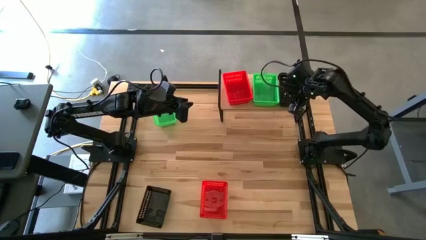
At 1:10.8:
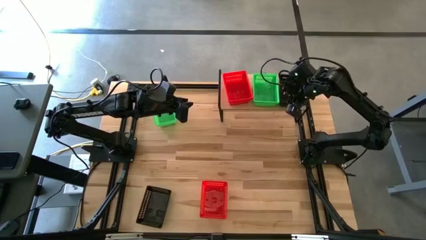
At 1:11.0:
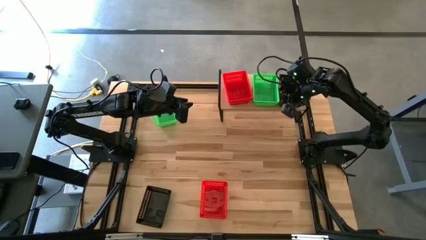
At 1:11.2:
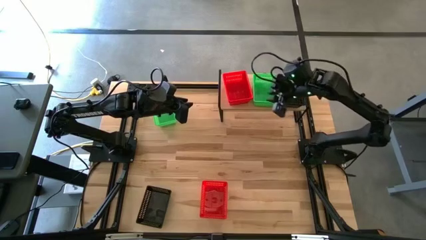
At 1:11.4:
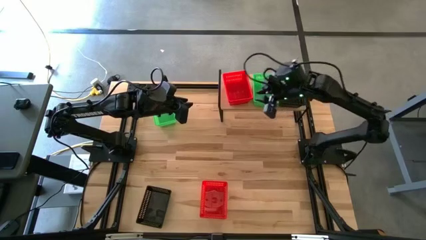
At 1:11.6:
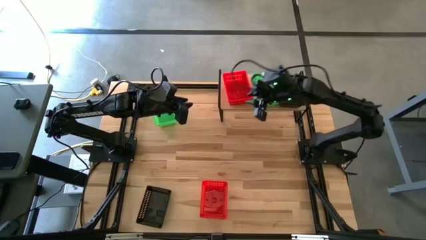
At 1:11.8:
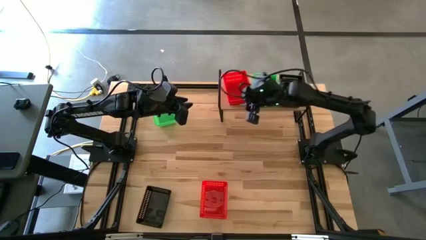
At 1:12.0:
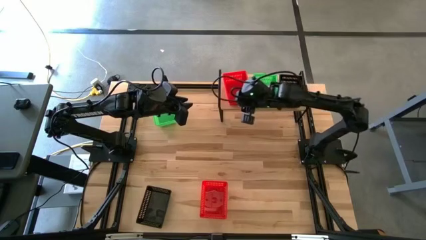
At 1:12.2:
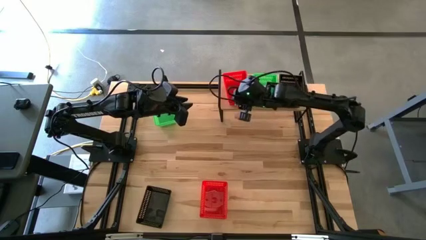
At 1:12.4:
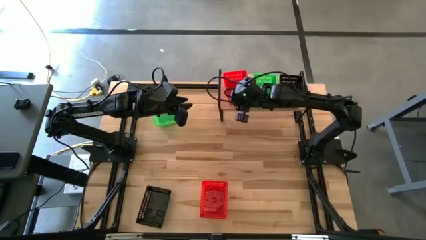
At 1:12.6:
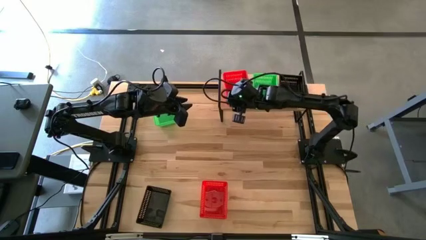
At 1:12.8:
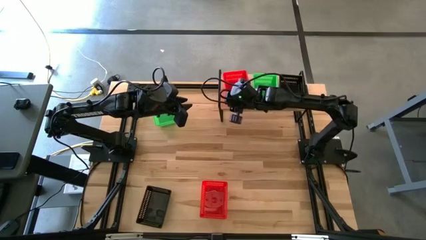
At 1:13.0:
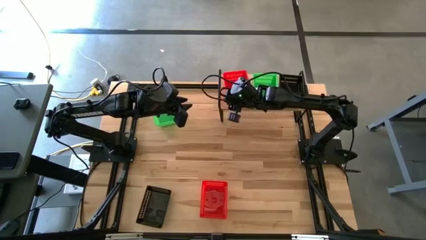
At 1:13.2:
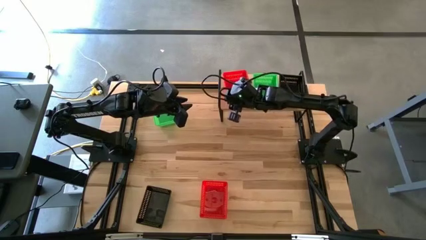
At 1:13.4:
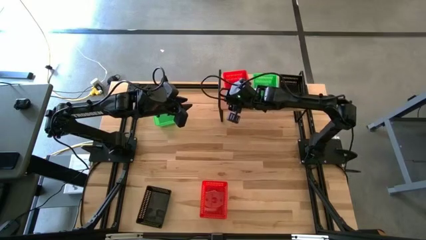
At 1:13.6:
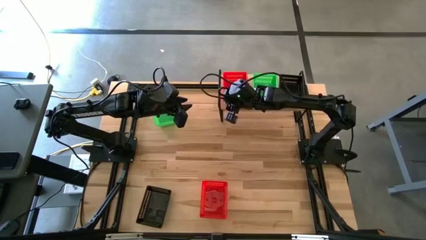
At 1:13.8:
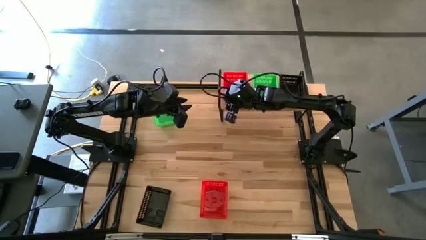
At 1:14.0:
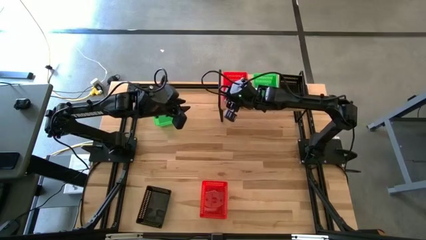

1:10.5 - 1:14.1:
Task: Stack baskets on shelf by color
Adjust the stacked red bins on the shelf

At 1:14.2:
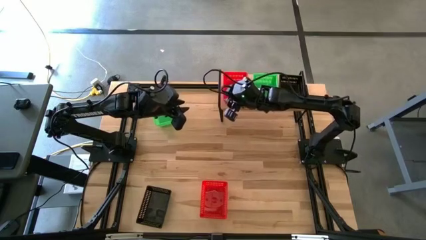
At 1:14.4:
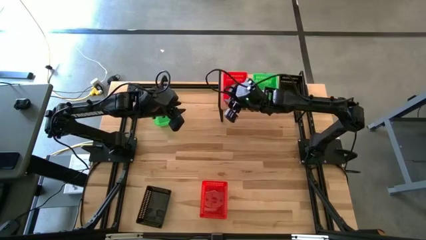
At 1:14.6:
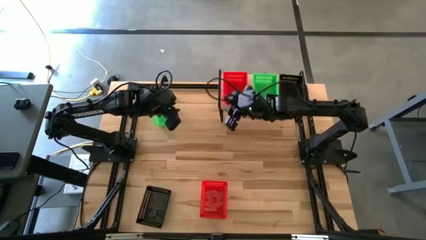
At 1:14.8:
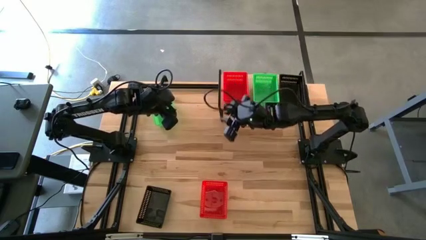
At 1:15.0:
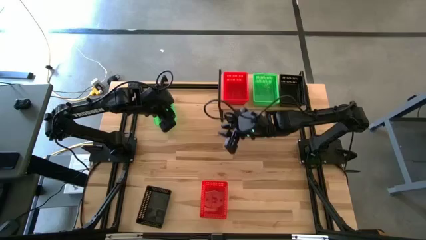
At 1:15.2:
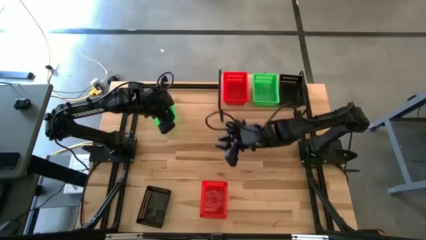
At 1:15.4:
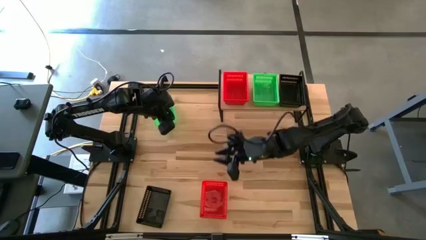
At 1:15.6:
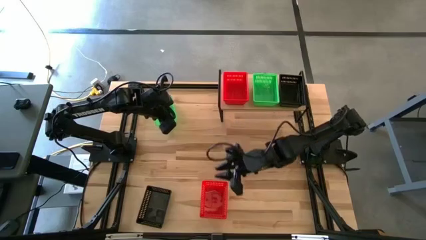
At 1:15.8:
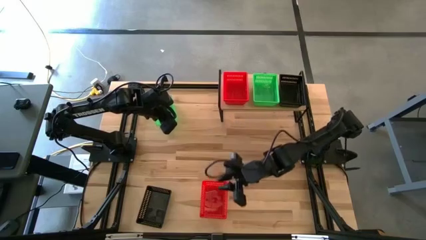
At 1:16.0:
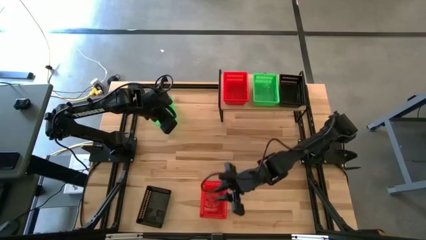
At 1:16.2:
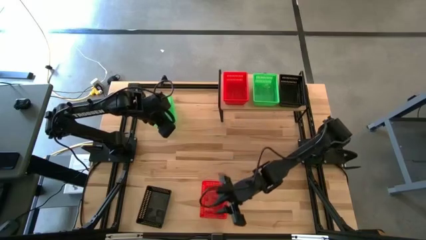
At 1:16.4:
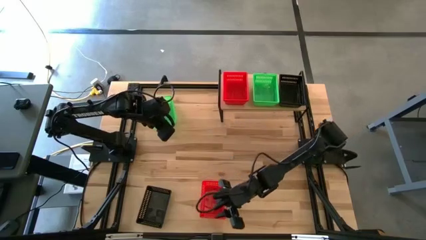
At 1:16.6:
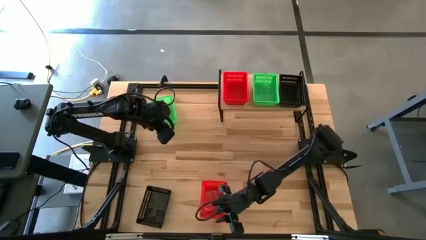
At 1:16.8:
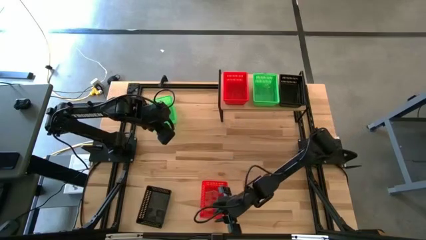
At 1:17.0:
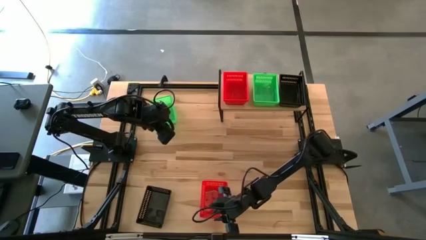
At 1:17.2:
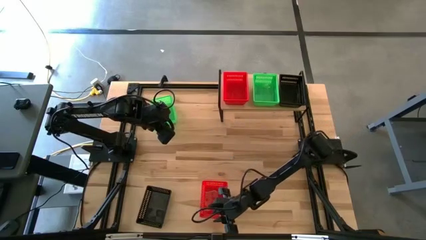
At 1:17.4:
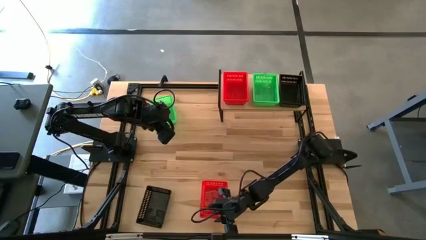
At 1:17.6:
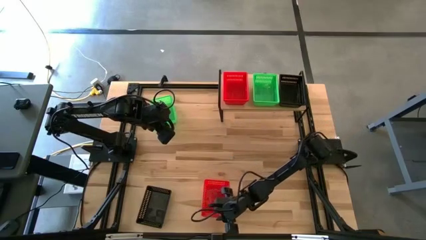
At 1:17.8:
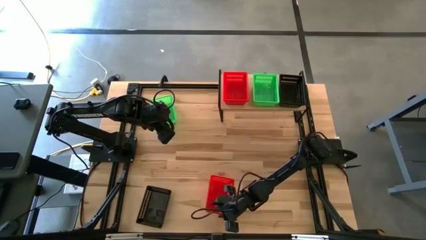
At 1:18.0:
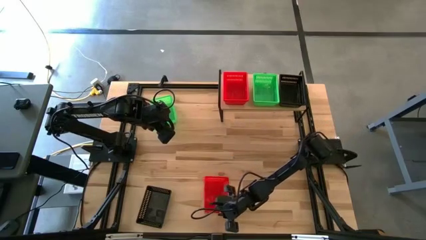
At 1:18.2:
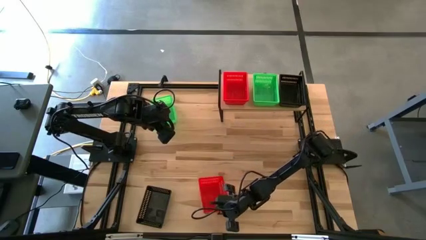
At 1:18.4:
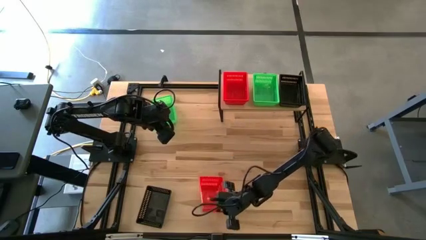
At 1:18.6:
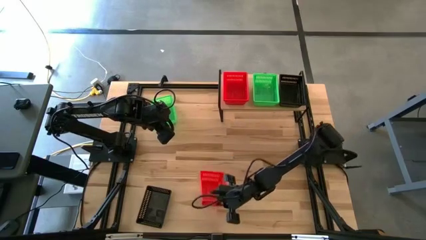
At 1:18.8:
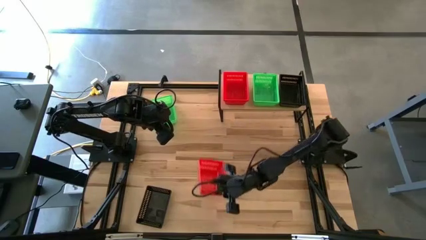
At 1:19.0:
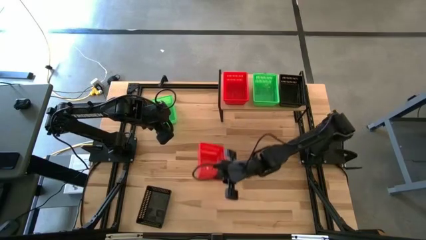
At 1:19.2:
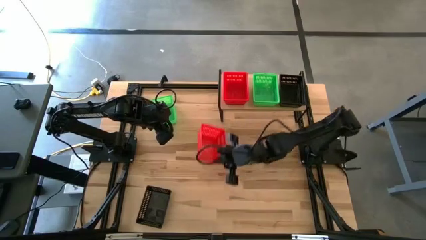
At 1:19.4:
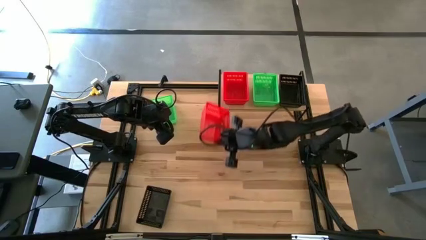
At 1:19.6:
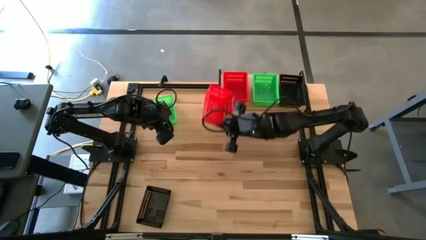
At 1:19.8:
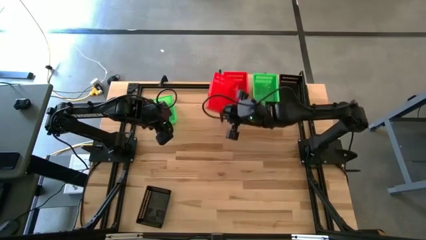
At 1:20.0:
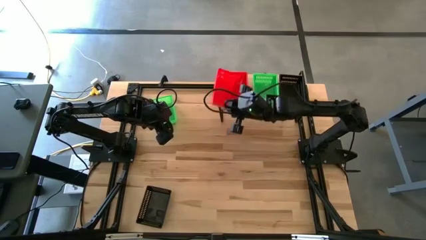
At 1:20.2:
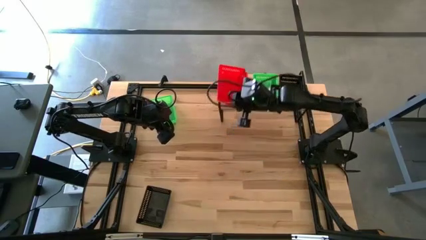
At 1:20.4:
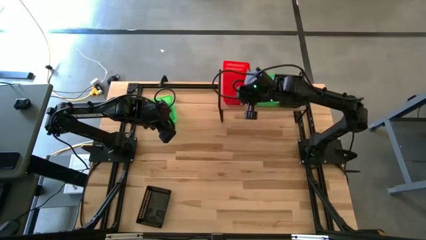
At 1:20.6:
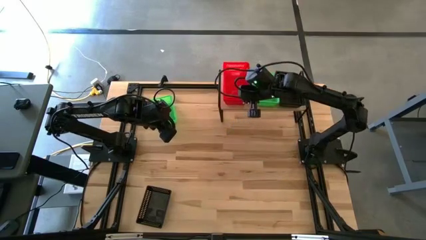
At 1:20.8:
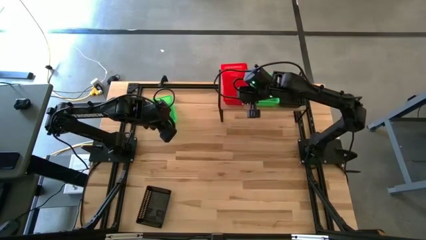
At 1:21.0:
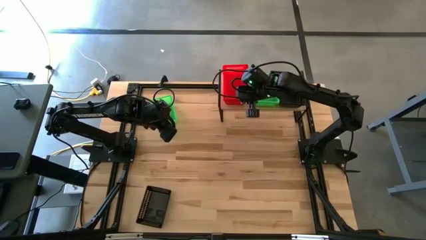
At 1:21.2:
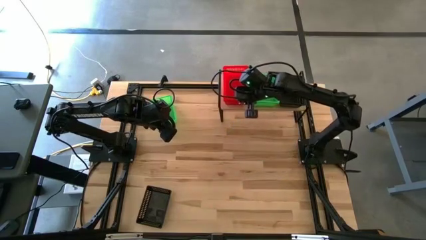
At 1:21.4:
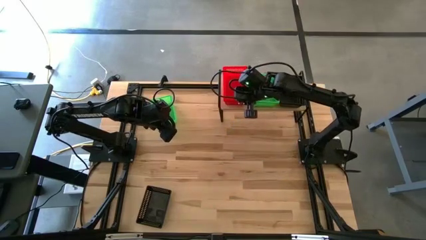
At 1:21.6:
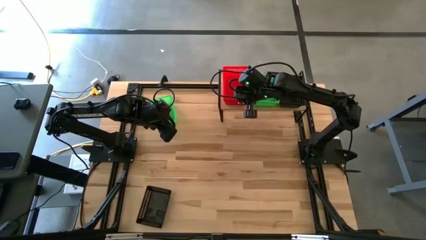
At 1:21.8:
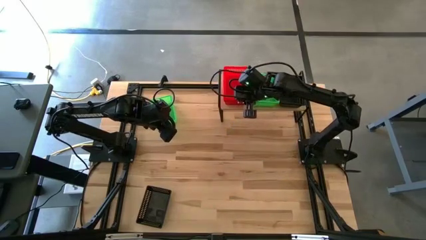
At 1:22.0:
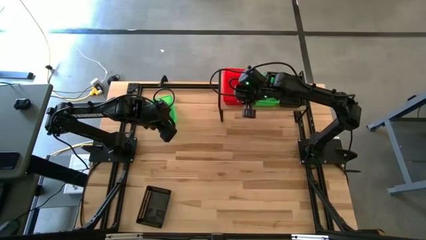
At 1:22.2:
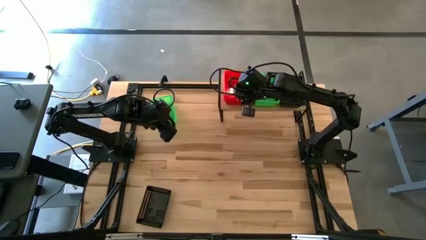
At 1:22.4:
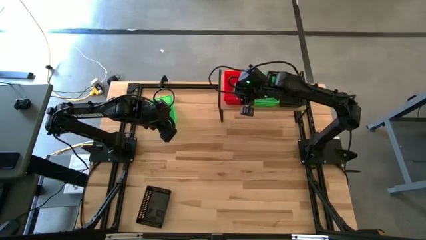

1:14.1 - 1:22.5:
Stack the red bin on top of the red bin

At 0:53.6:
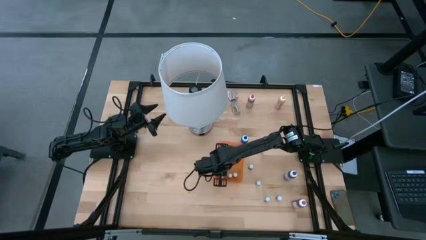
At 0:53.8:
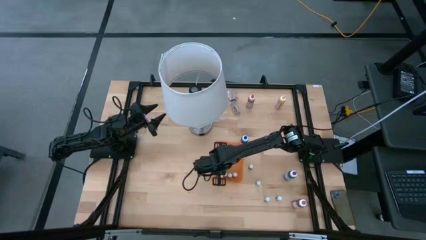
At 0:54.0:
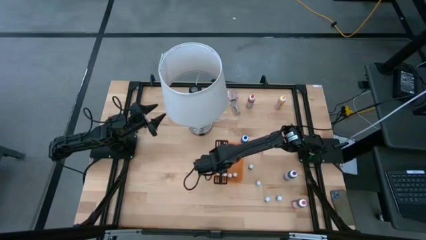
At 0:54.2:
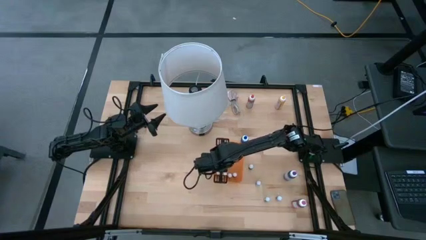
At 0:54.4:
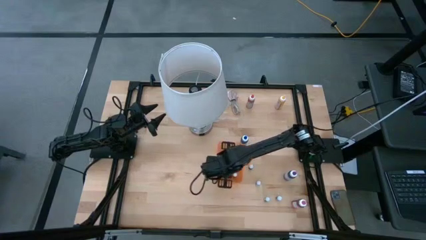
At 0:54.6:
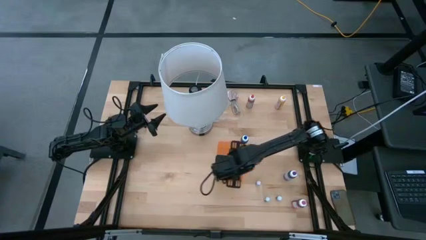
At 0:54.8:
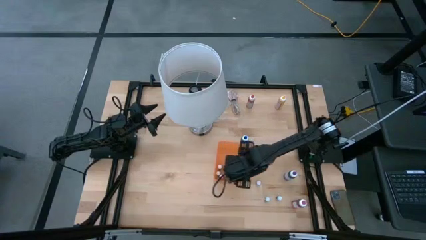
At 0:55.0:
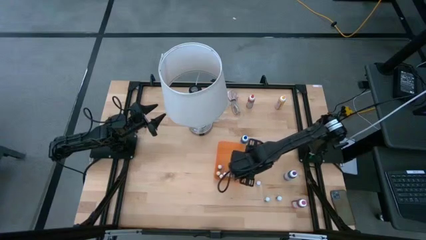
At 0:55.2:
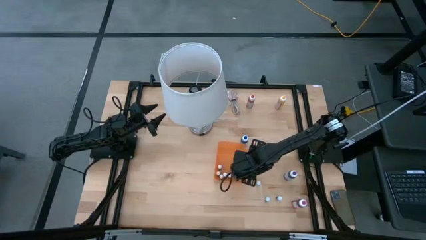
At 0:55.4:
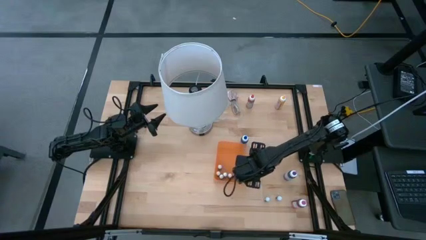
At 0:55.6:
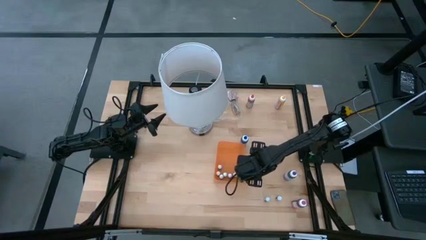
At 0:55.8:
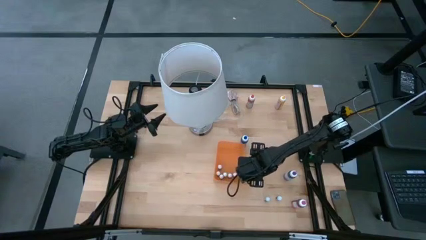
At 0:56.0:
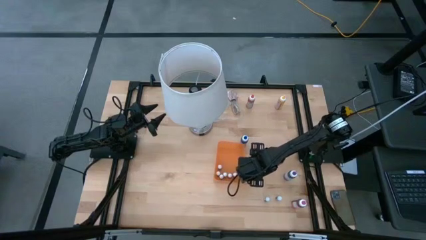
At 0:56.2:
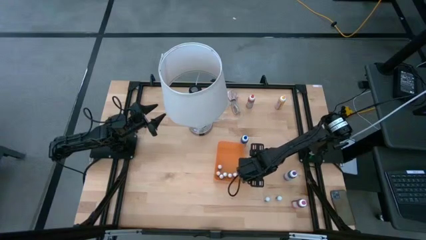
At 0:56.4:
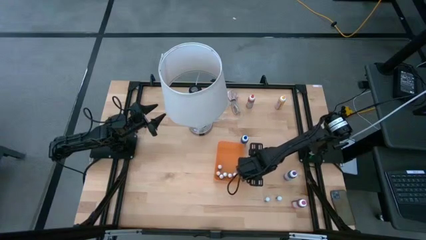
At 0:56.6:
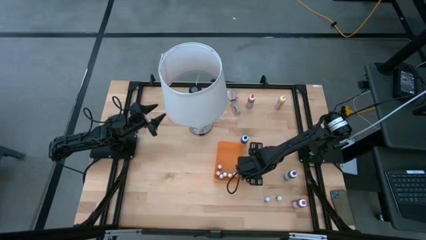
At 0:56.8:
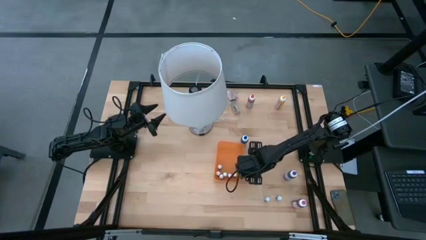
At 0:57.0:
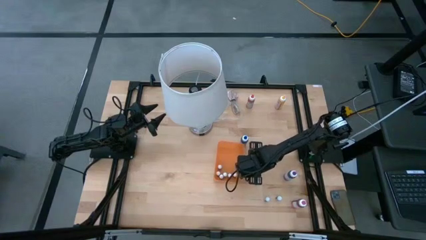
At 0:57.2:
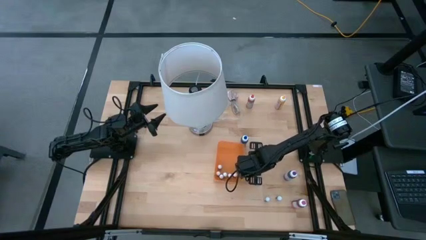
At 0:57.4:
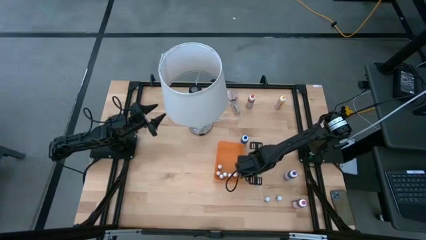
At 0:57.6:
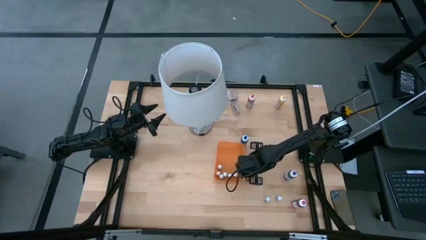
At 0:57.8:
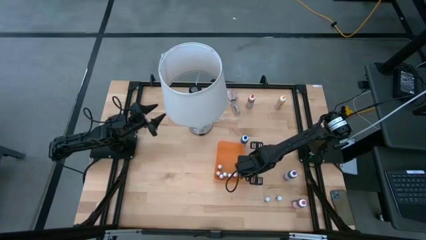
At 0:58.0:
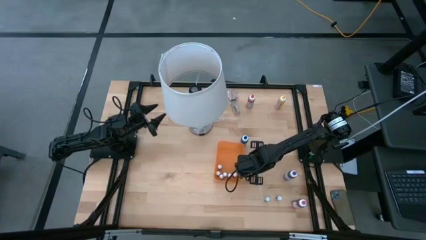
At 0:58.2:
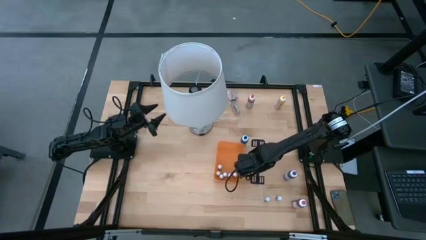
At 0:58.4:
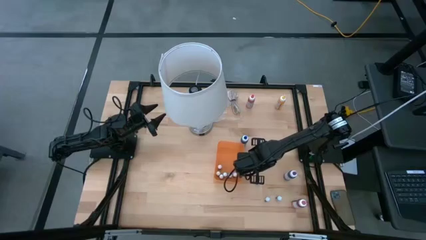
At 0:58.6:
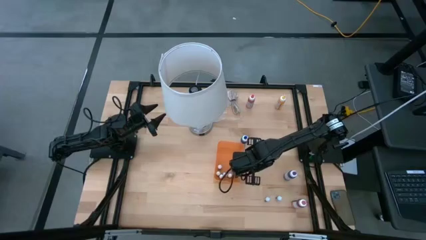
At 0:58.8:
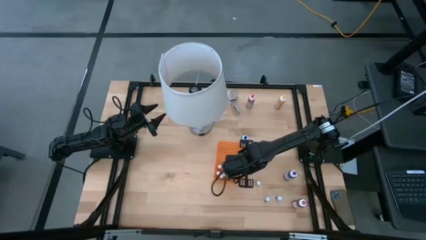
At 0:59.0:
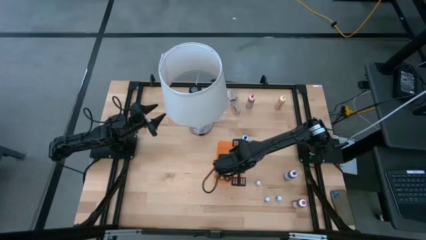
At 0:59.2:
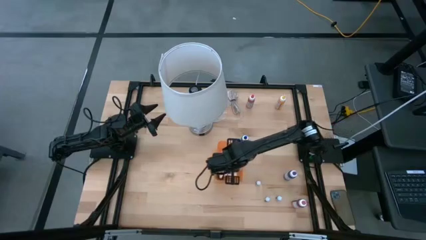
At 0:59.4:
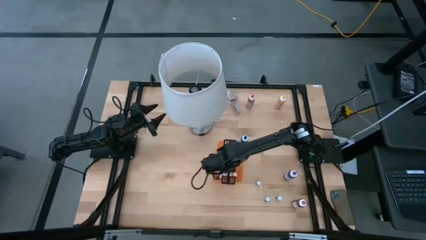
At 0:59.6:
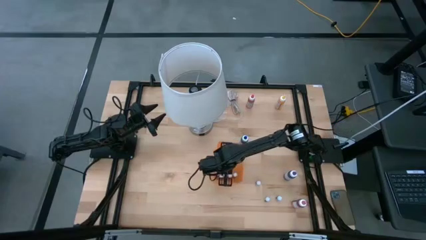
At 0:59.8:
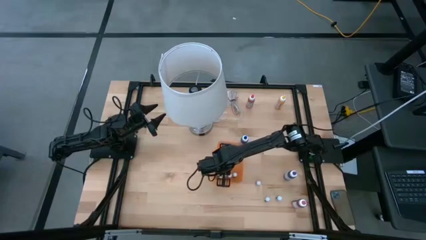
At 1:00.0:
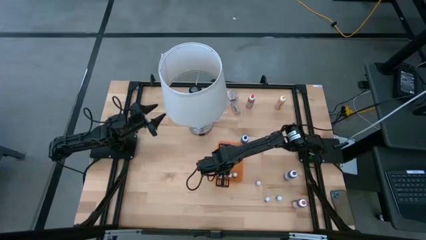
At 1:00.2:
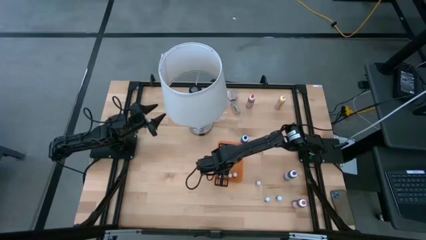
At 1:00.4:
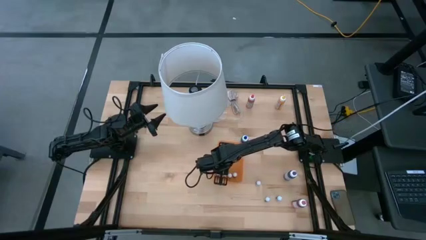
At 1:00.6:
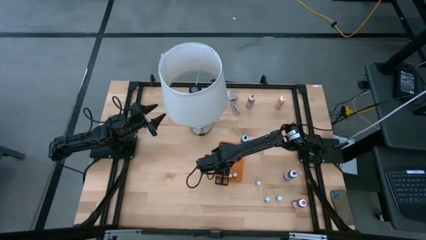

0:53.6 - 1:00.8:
Task: Pick & Place food coloring
Put the small black food coloring bottle into the orange bin
